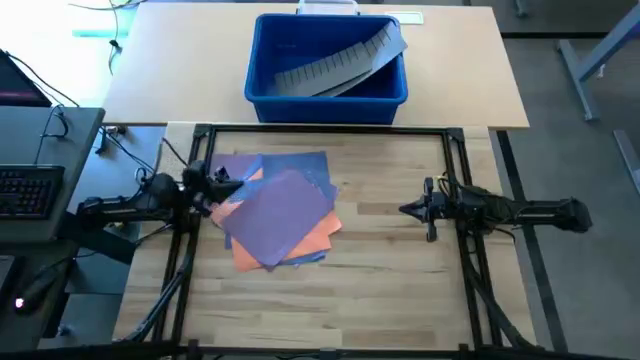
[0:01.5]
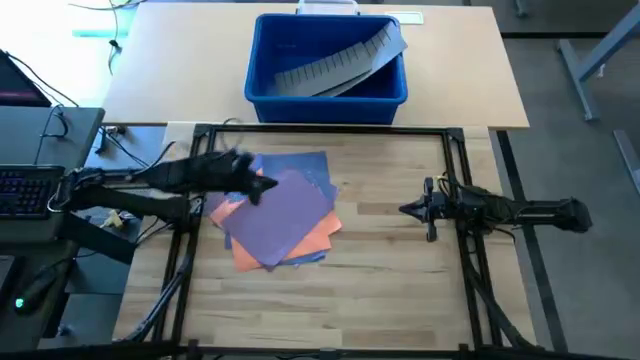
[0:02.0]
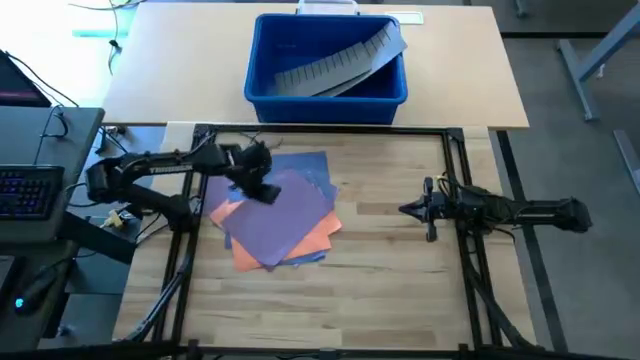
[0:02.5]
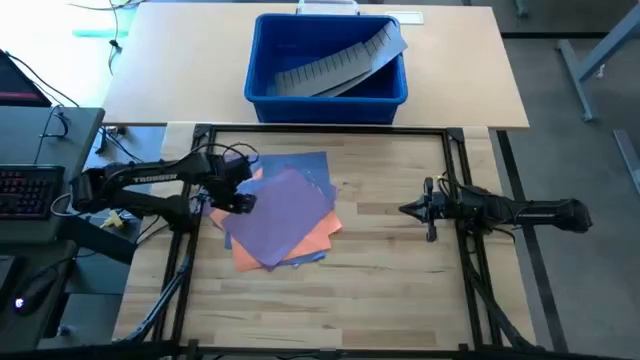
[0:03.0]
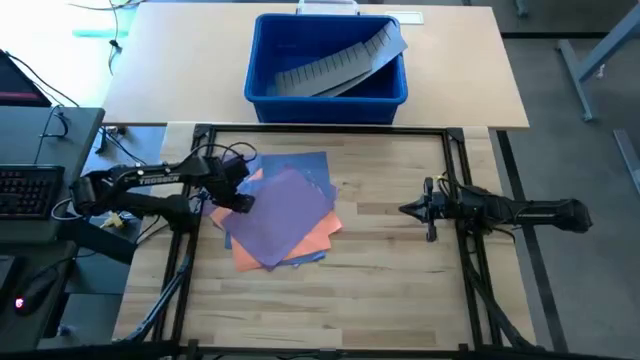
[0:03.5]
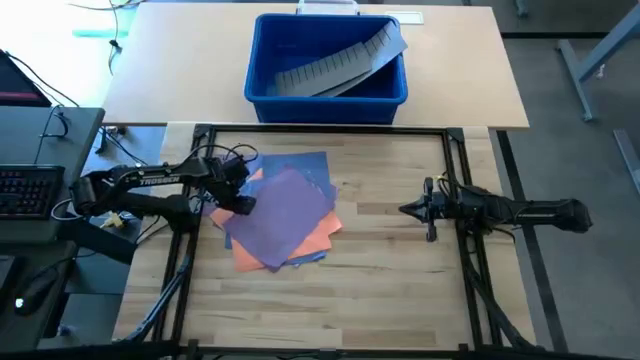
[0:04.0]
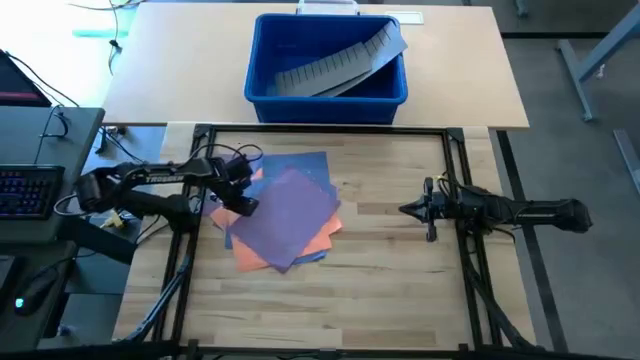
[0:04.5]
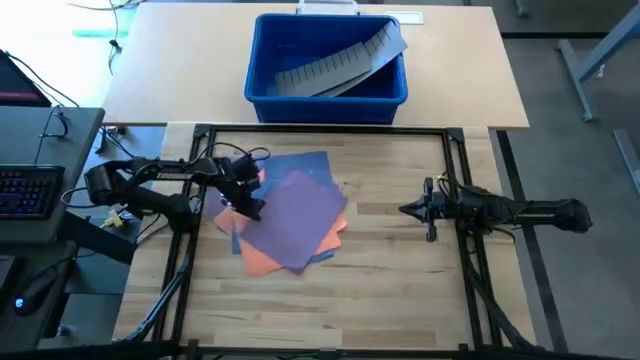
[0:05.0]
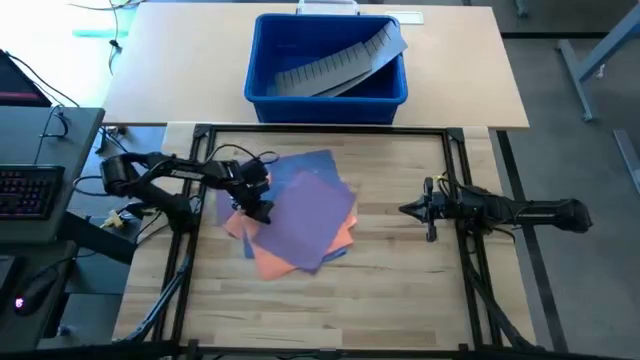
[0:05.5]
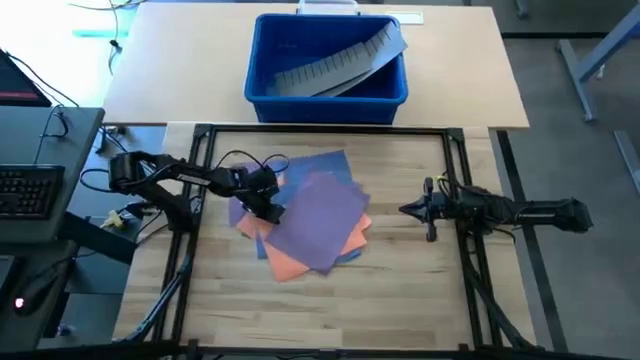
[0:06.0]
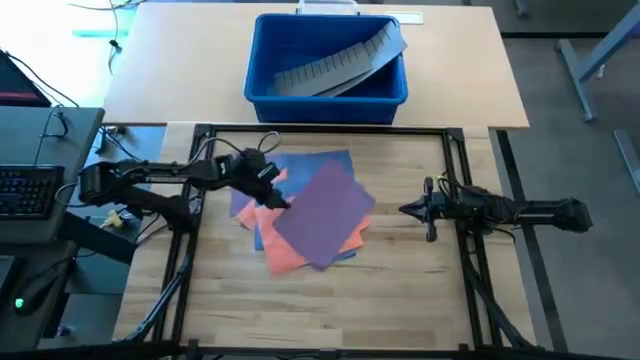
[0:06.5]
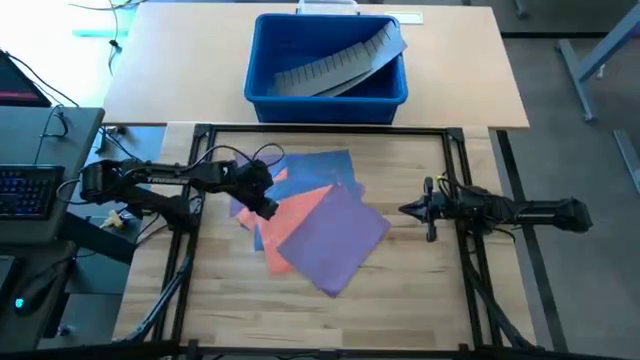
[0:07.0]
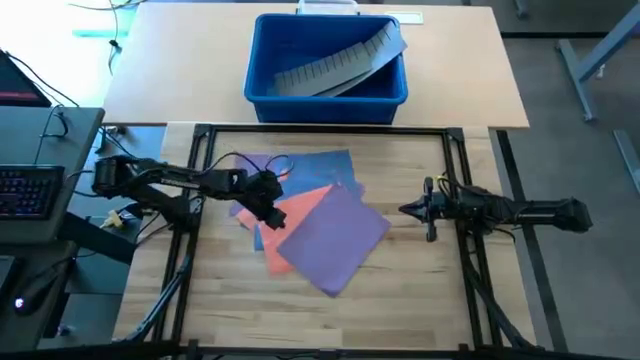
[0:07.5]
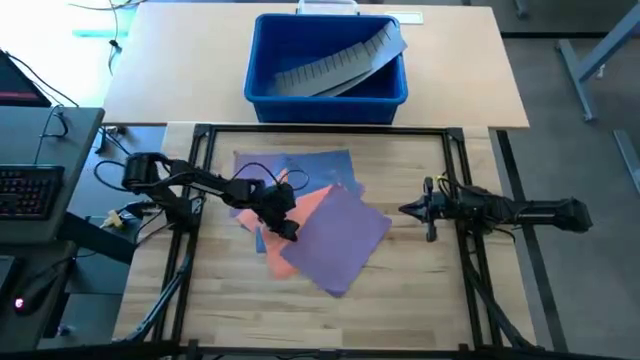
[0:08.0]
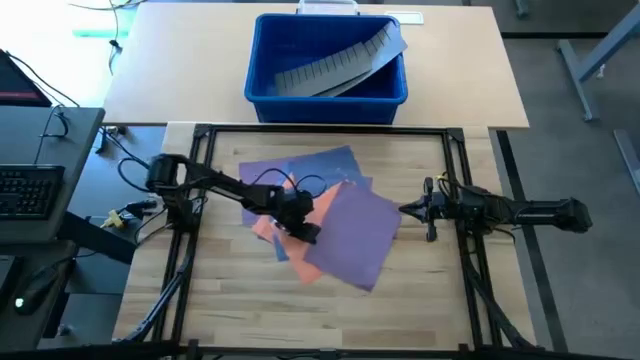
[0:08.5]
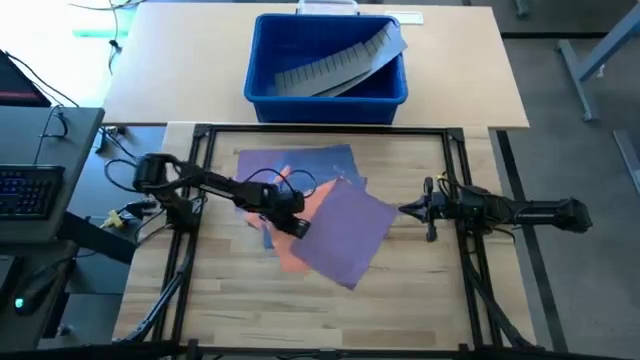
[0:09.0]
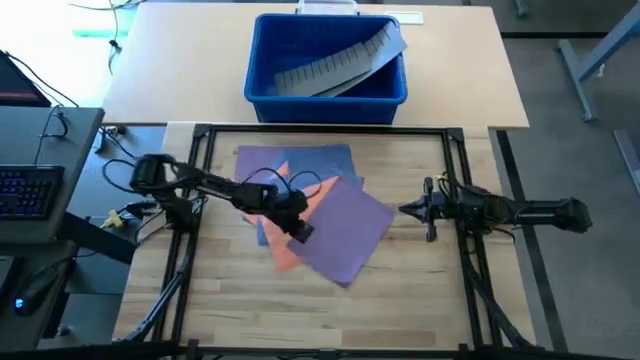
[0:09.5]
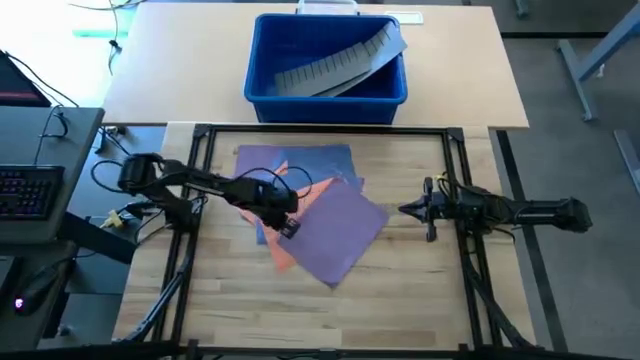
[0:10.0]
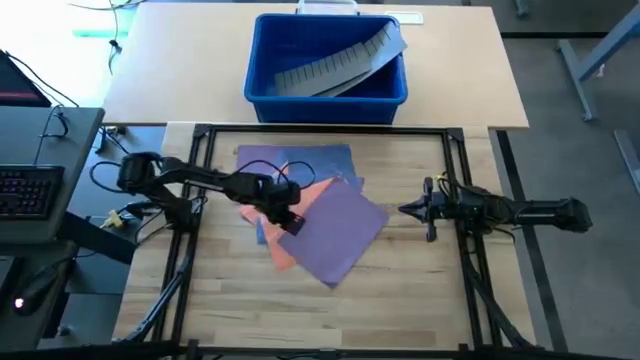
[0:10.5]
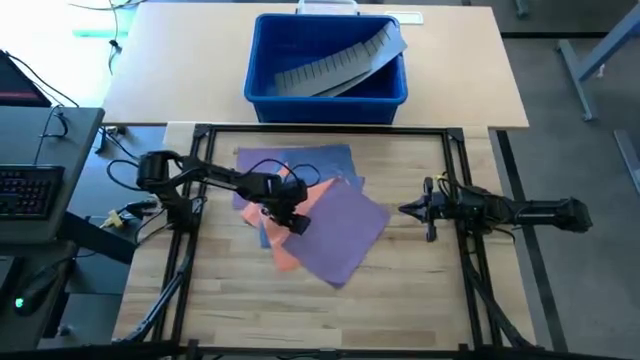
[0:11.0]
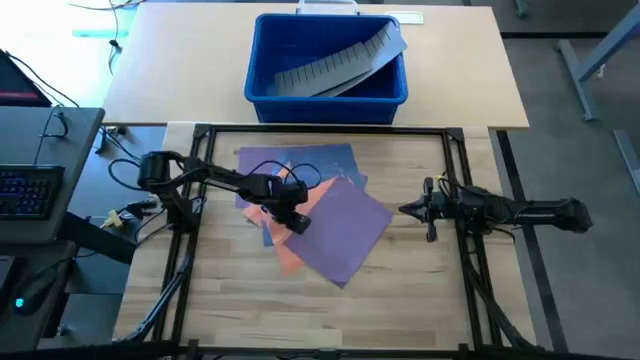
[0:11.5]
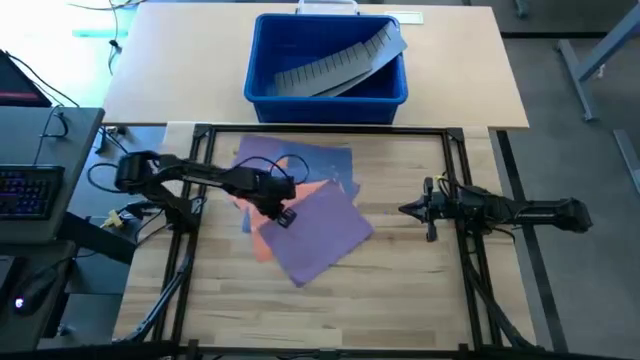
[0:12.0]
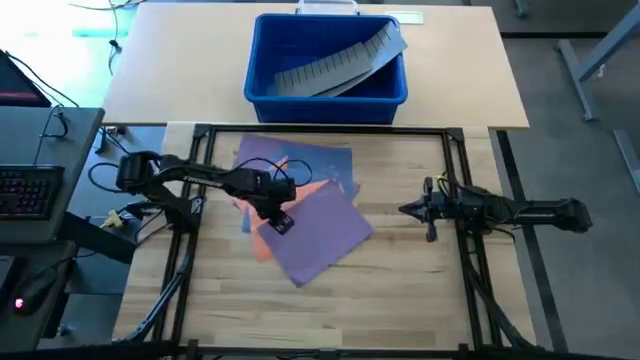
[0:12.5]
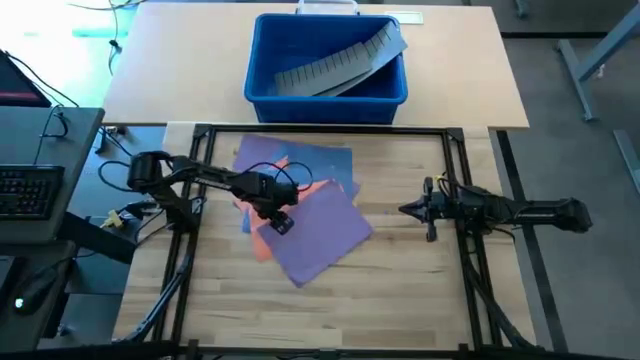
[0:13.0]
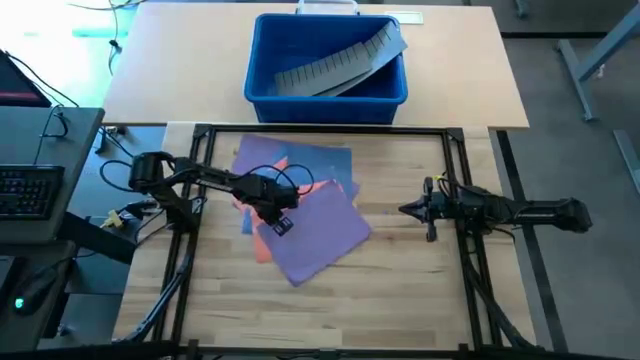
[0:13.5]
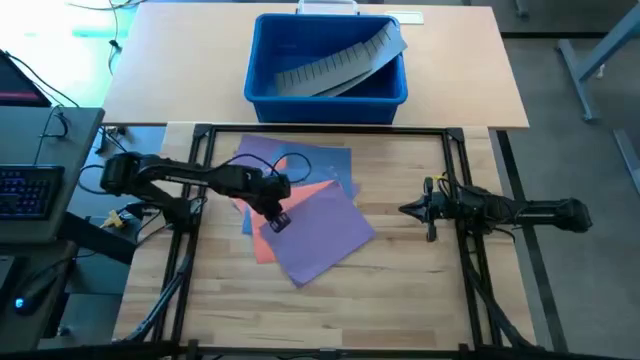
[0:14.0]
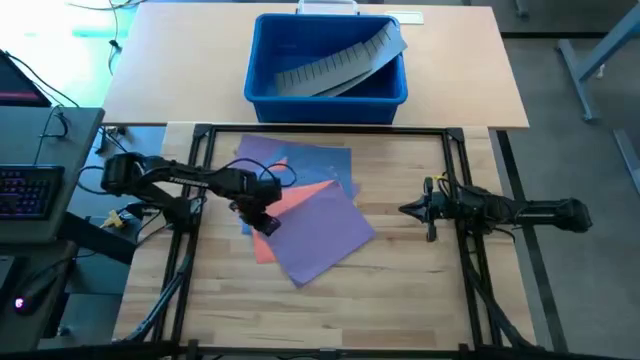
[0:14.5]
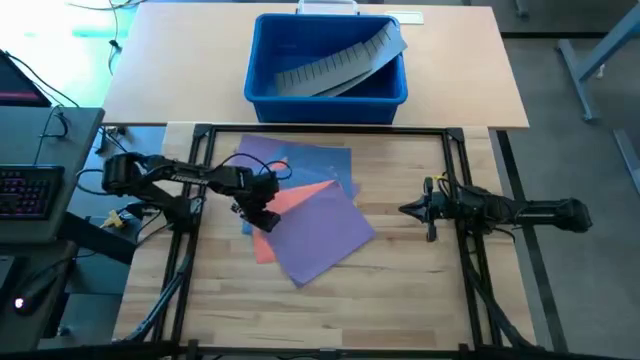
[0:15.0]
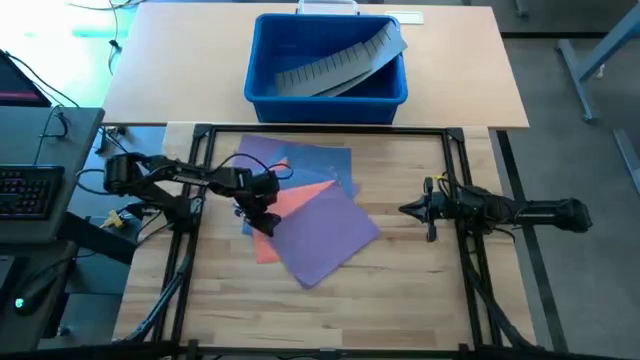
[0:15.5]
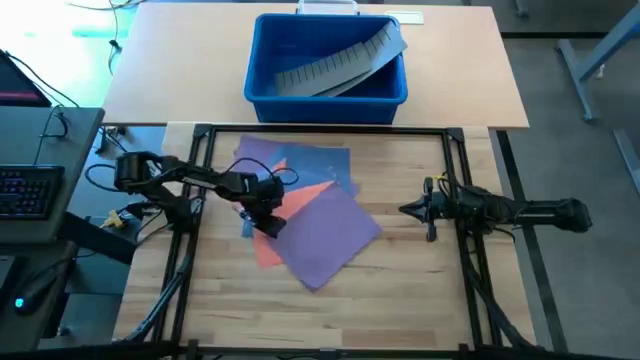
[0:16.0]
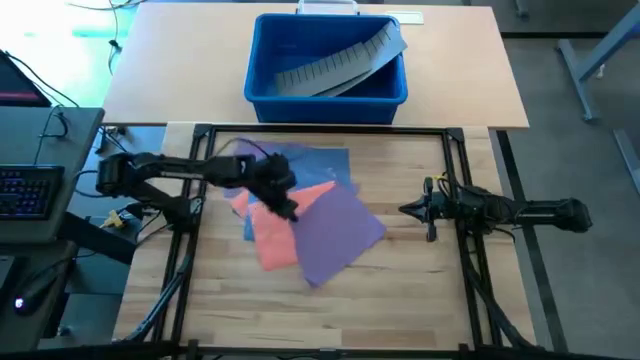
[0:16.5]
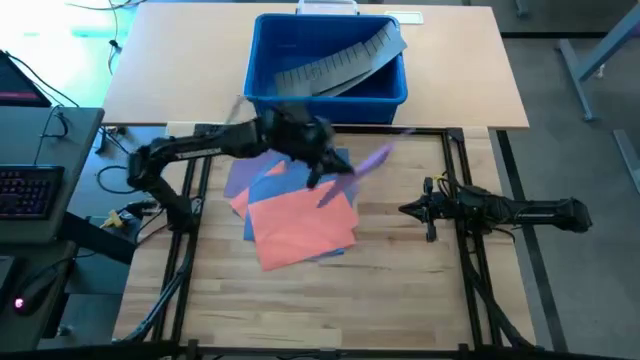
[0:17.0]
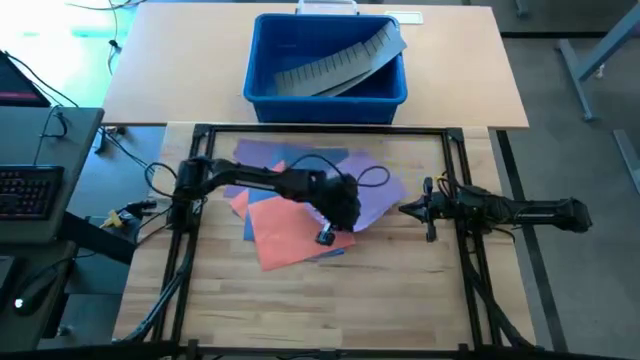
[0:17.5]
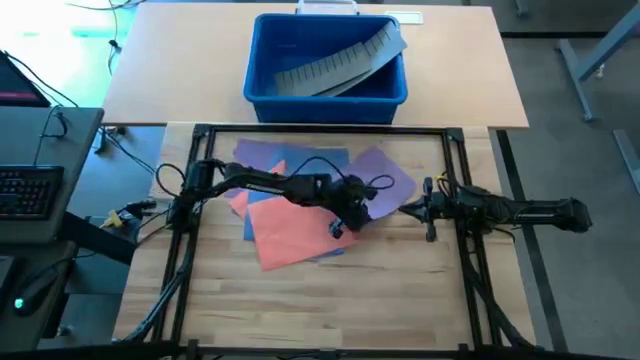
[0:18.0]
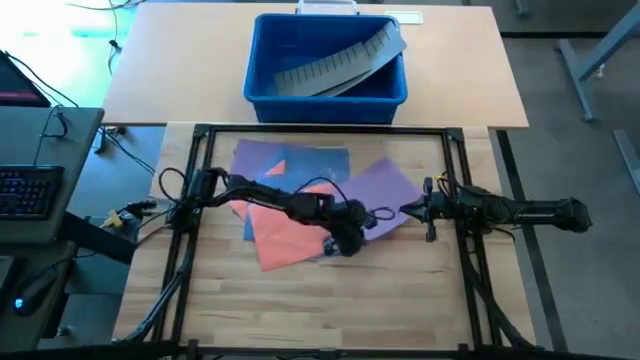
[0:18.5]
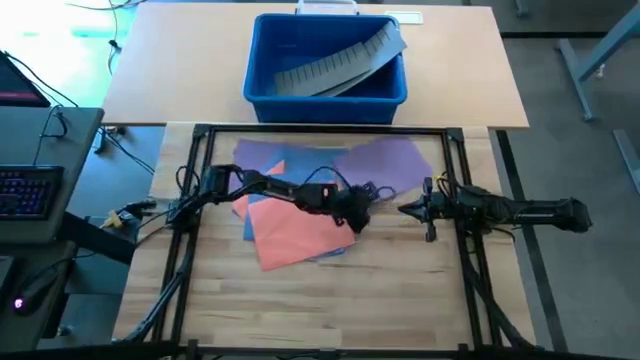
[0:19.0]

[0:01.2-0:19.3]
Task: Organize paper
Move the purple paper to the bottom right of the table

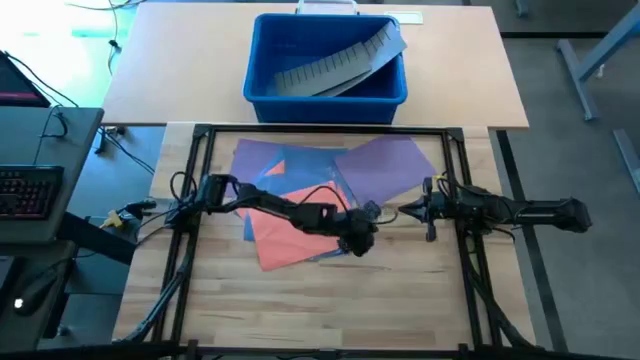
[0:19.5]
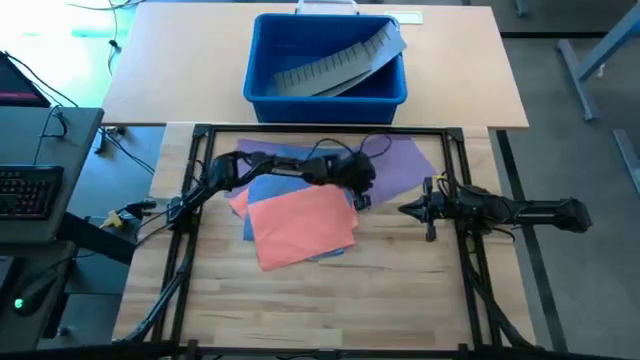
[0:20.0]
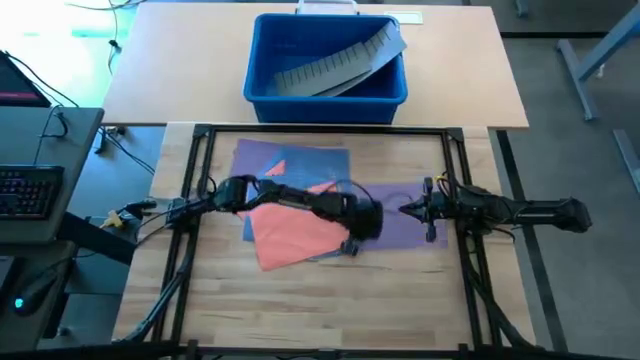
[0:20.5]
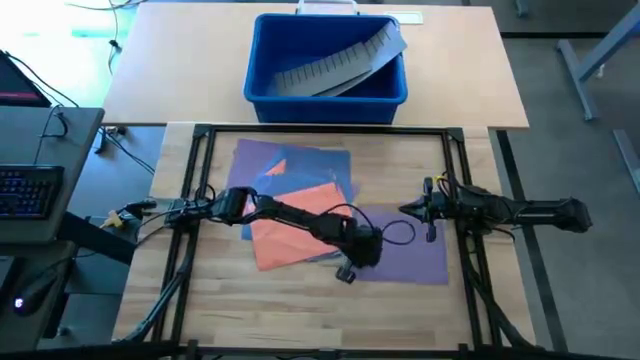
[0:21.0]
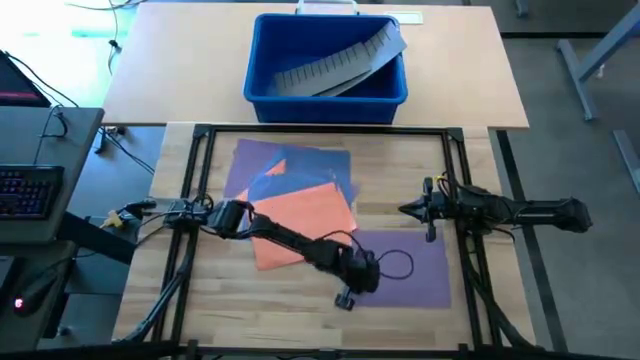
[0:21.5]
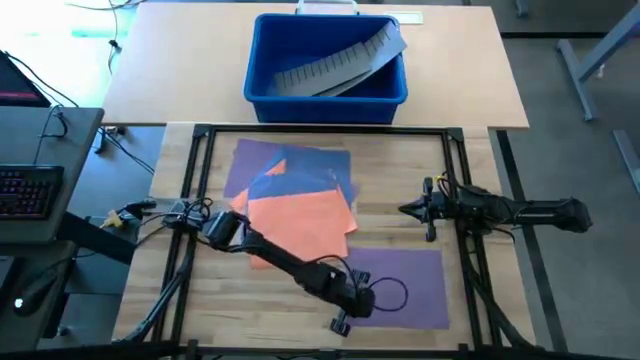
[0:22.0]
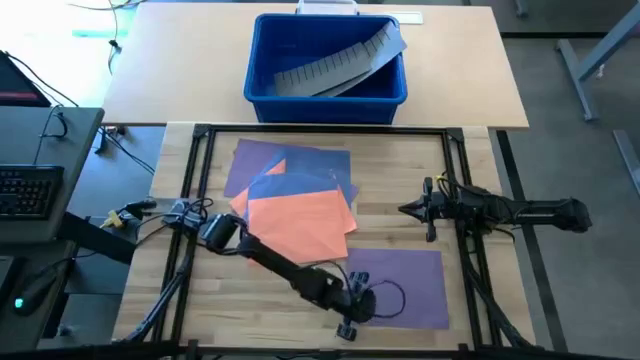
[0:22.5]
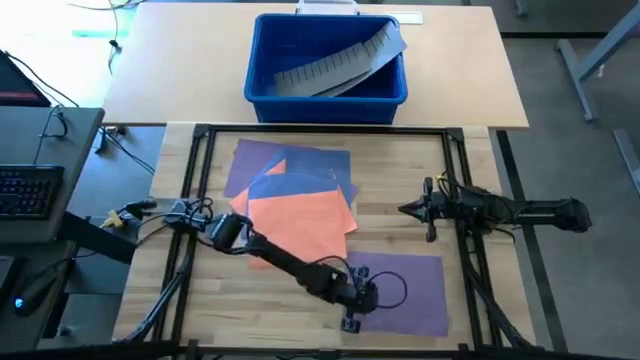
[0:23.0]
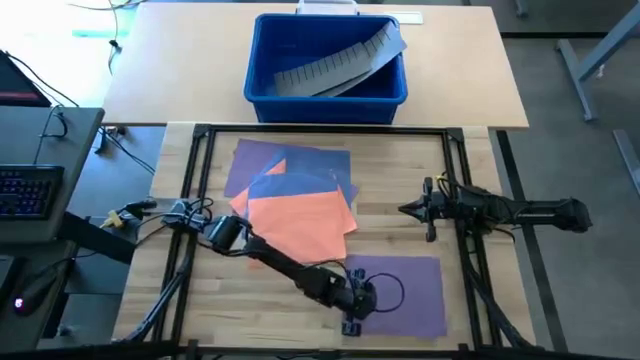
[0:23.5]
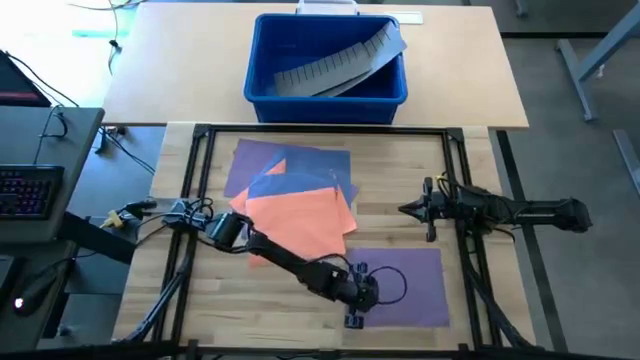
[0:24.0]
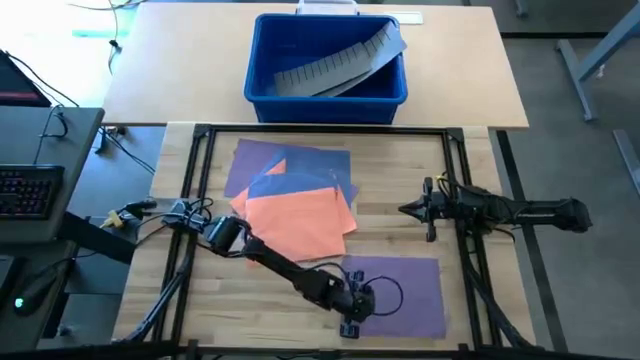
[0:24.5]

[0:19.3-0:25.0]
Move the purple paper to the bottom right of the table
